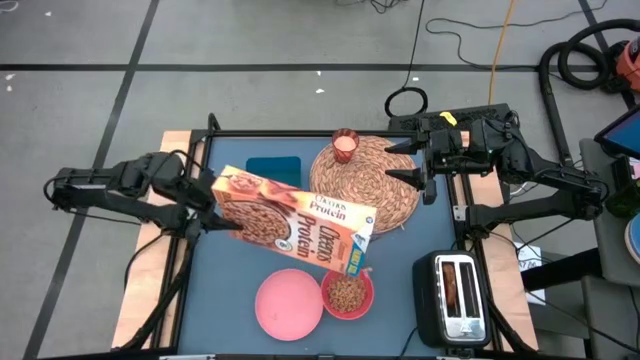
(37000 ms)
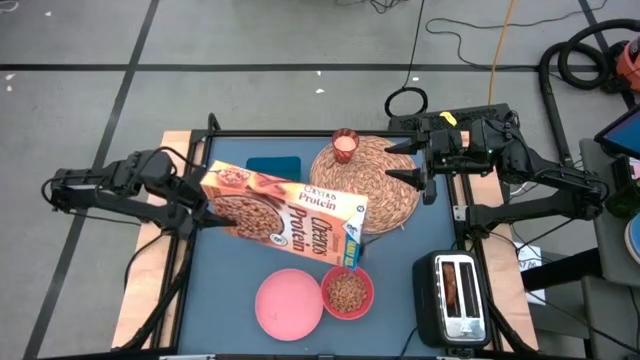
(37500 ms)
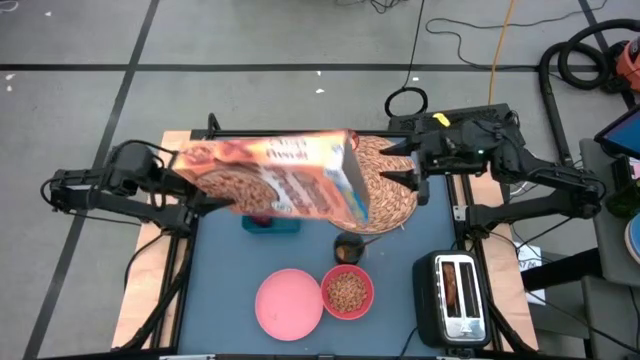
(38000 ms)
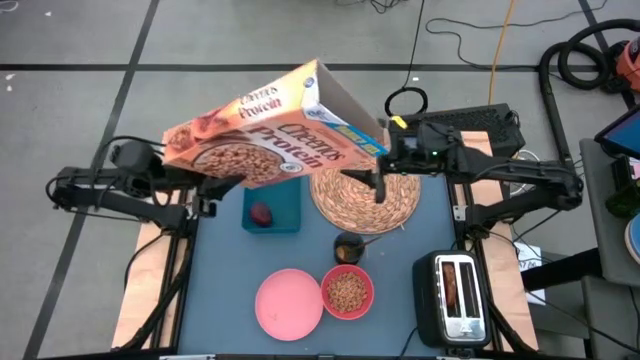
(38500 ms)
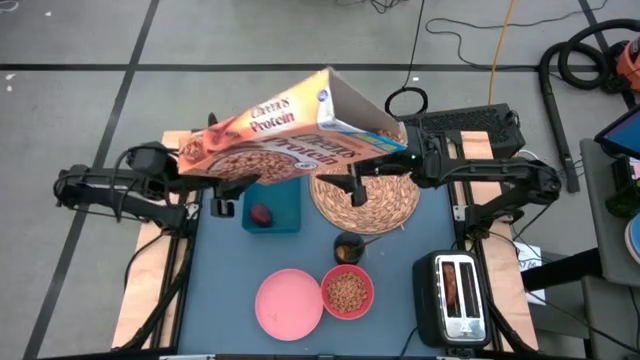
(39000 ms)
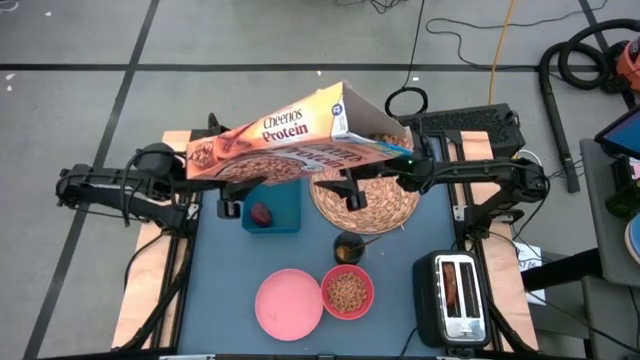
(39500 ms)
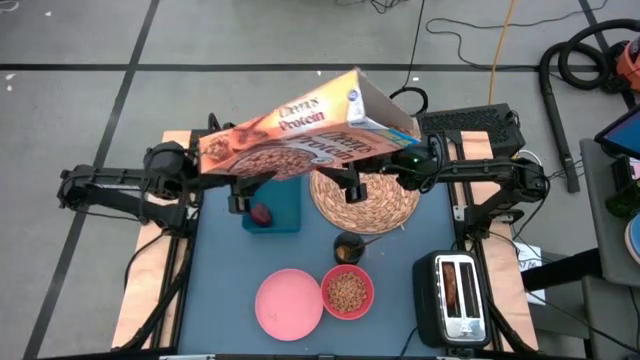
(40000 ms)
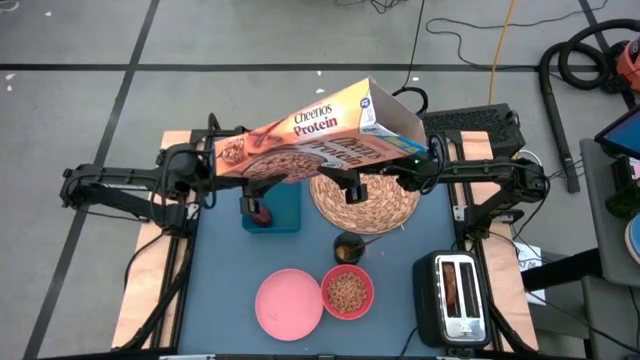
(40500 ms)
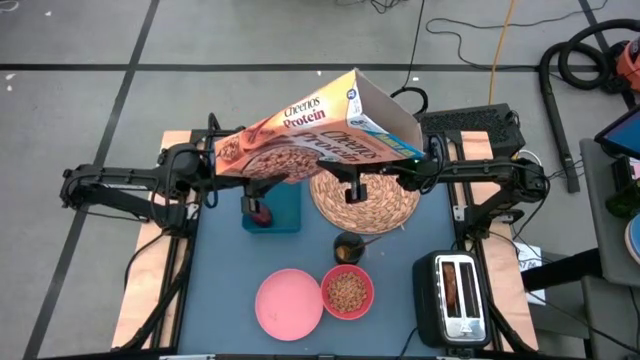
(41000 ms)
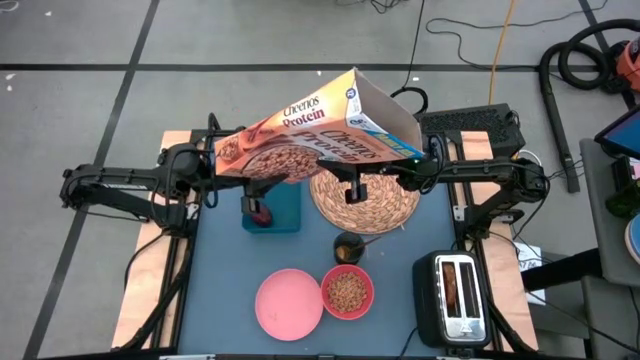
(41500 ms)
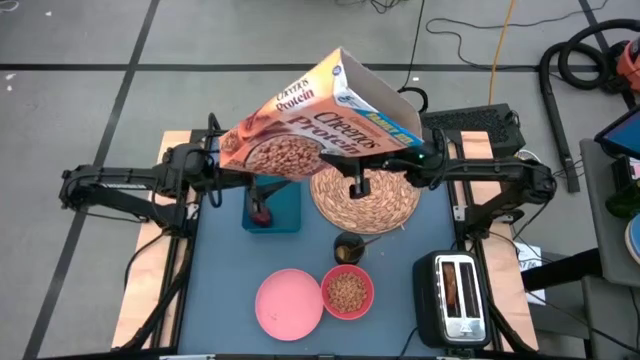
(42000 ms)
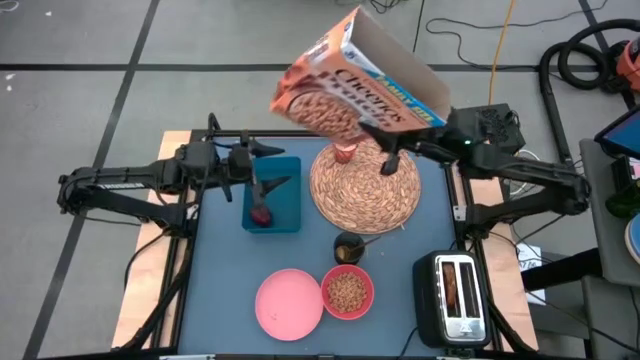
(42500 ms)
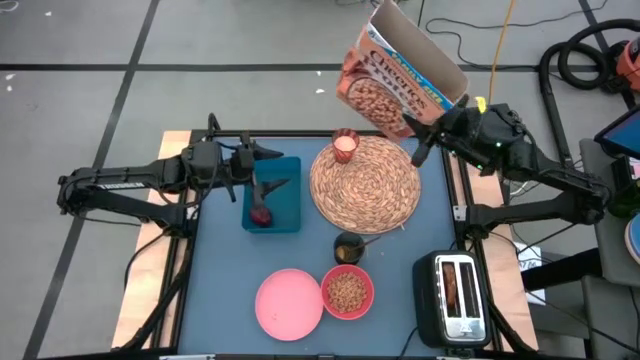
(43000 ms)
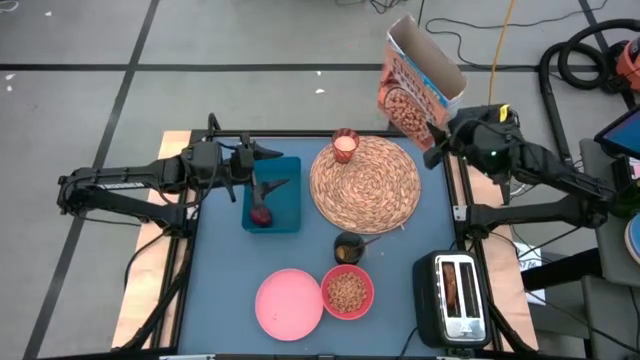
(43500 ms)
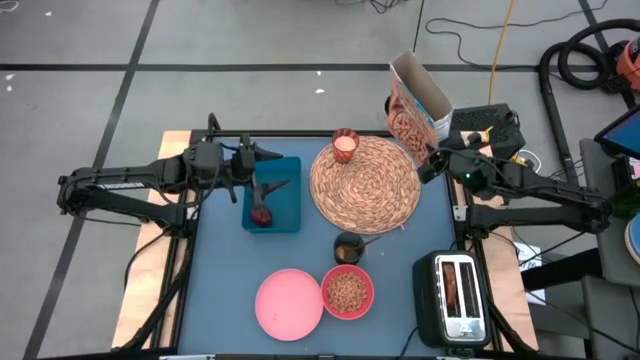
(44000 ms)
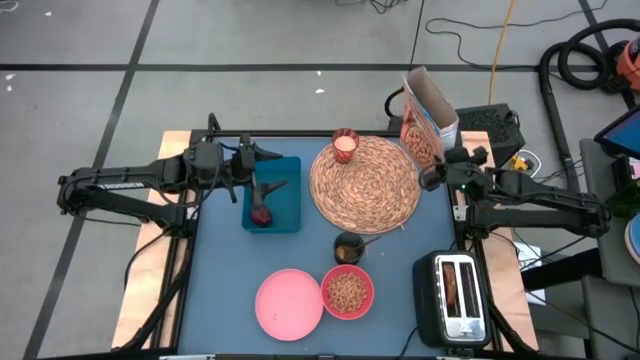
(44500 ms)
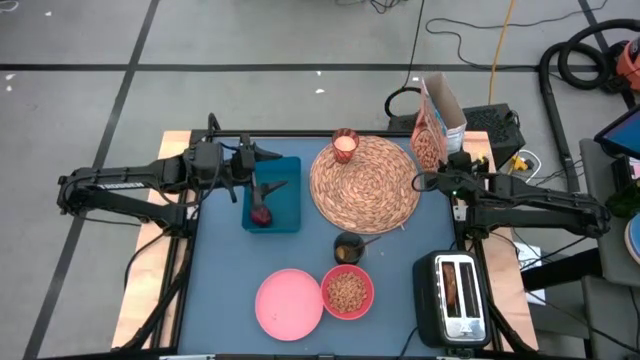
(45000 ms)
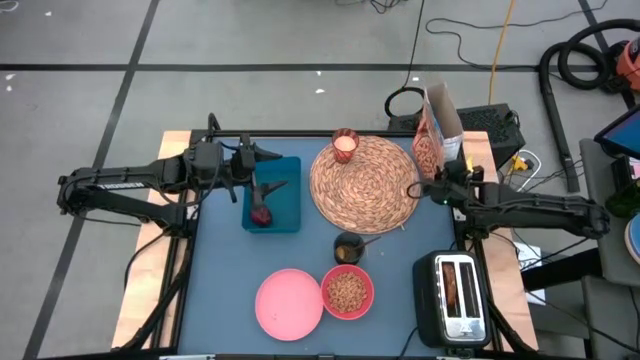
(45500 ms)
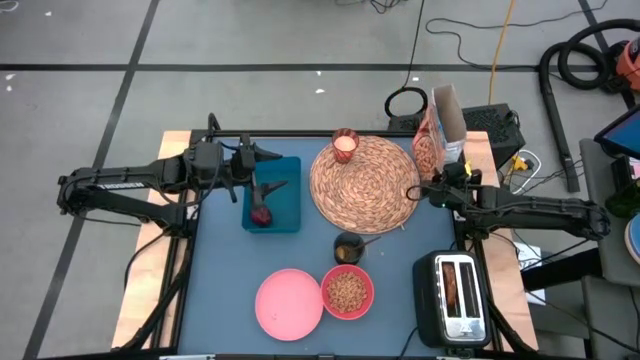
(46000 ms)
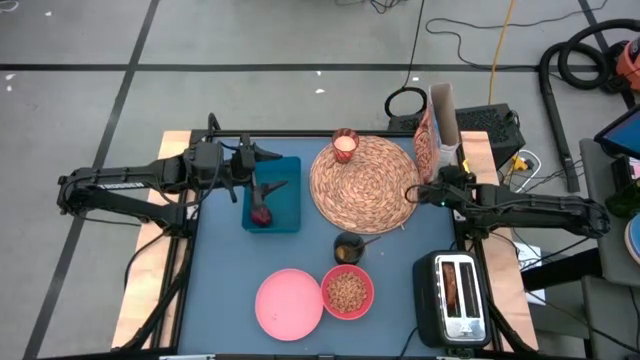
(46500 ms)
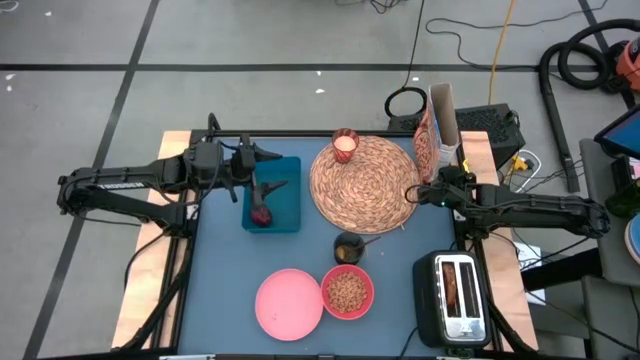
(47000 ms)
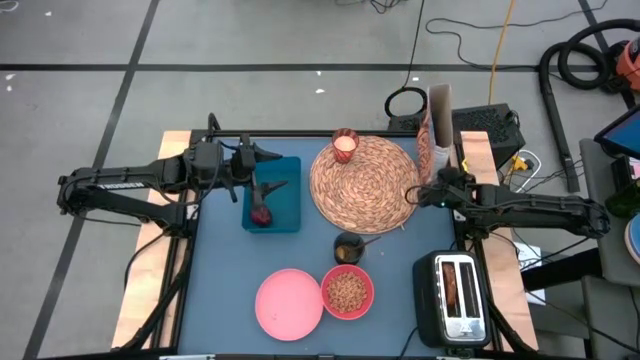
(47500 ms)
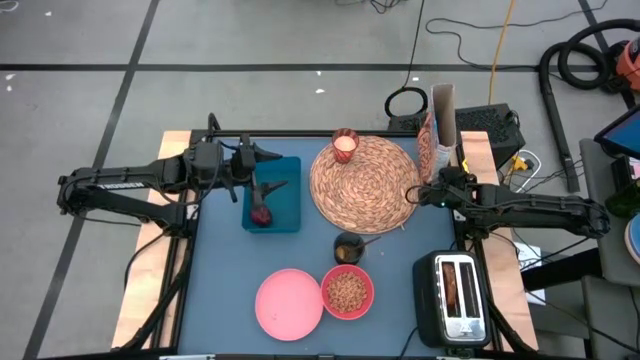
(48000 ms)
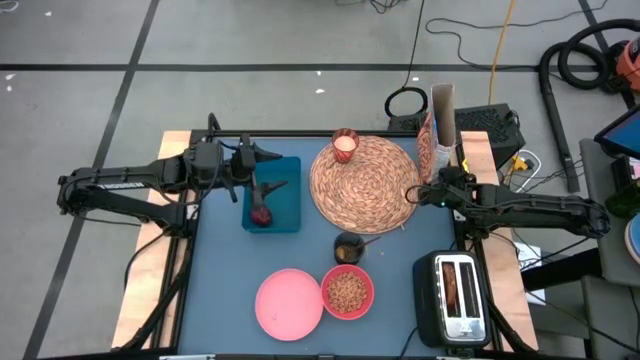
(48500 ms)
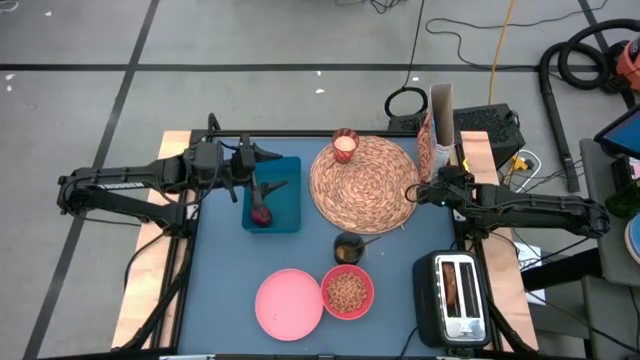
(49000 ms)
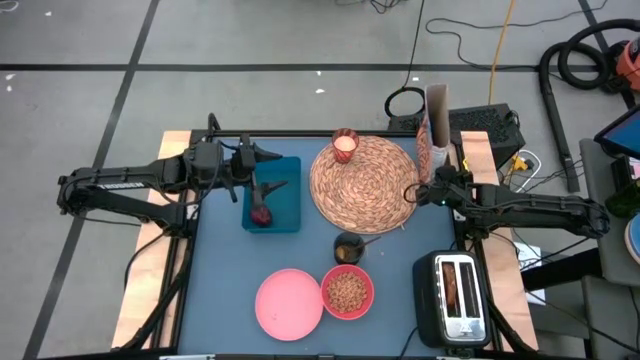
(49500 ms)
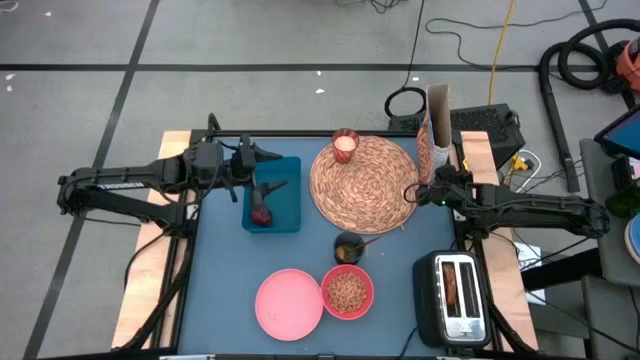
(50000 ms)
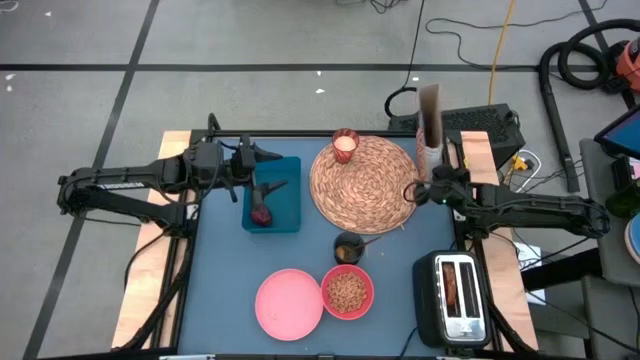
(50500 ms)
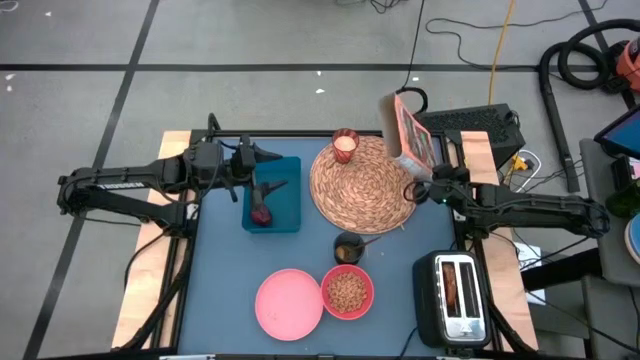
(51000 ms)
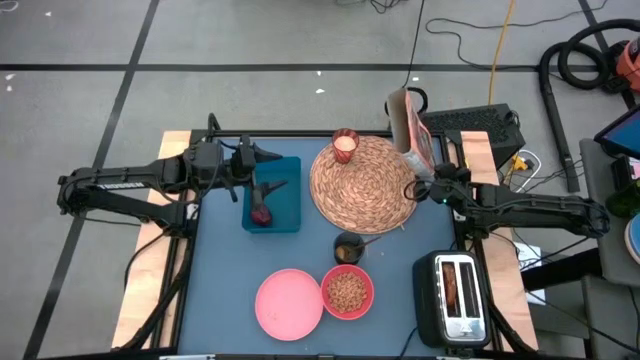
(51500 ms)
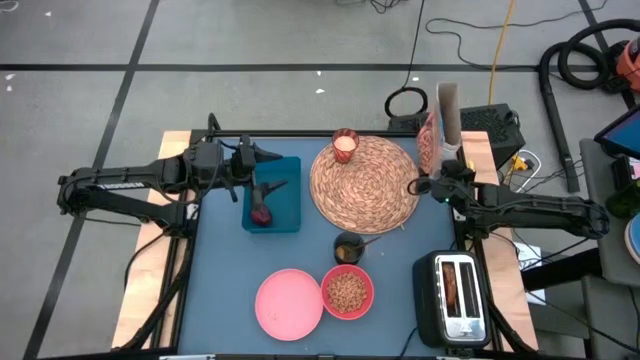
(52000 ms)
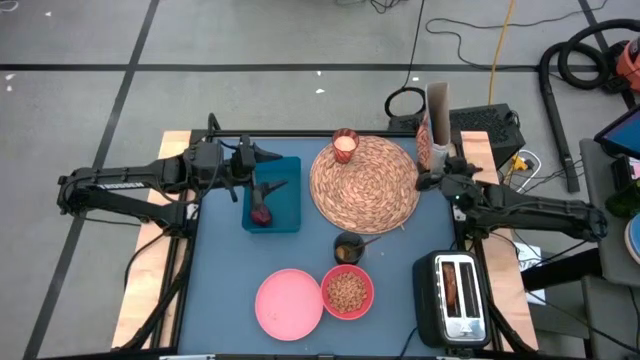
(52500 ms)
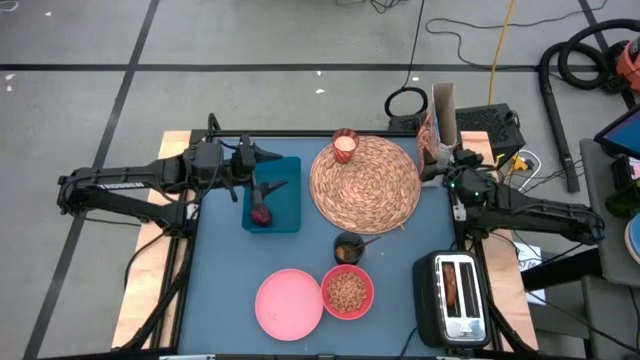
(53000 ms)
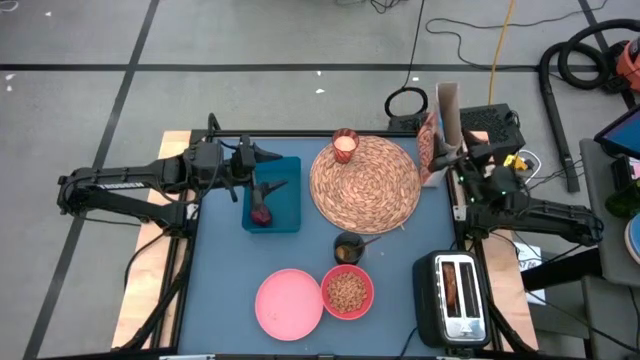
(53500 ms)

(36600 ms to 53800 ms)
Task: Arrange a breakfast setting
Pour the cereal into the pink bowl

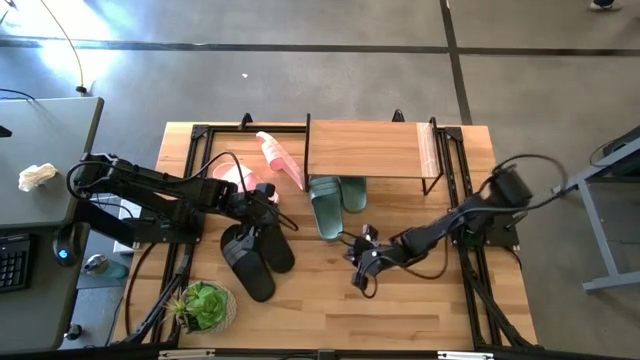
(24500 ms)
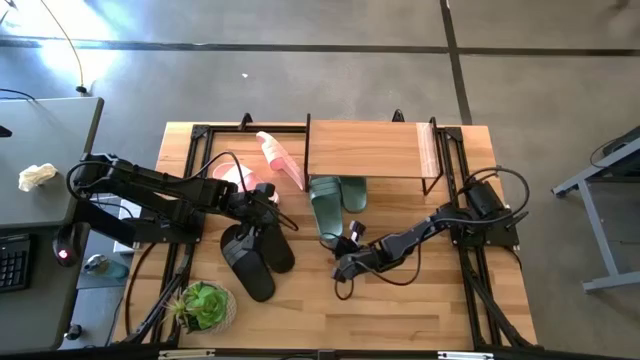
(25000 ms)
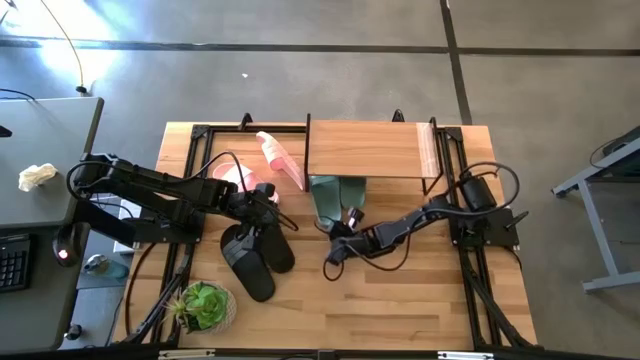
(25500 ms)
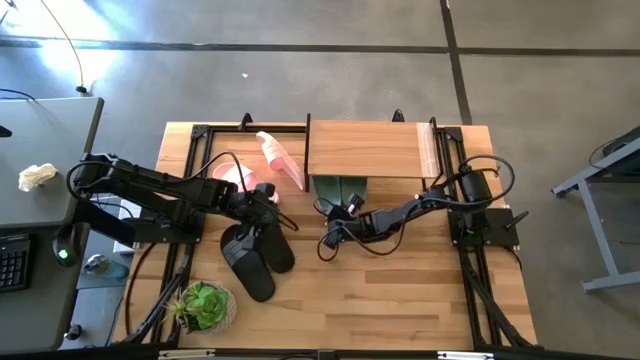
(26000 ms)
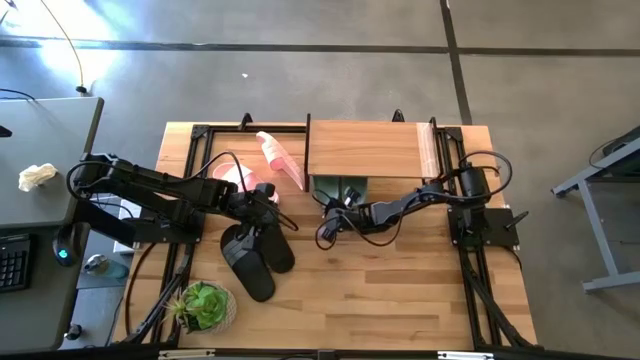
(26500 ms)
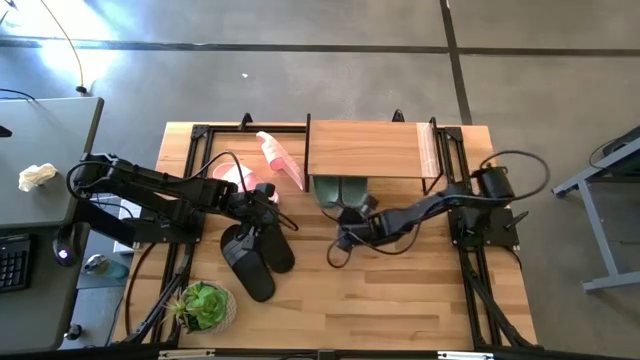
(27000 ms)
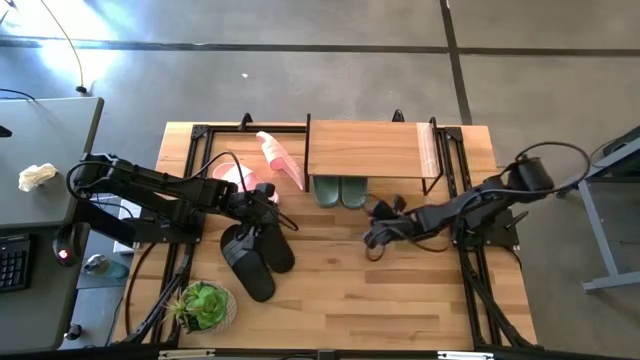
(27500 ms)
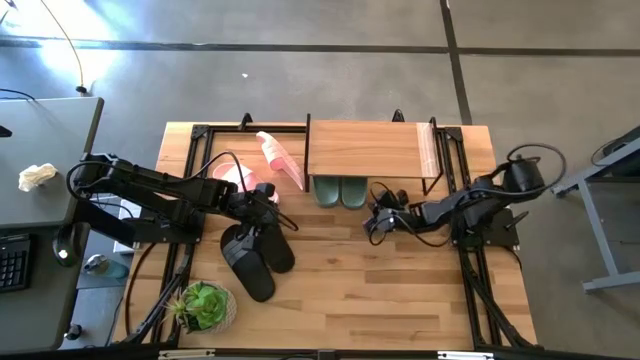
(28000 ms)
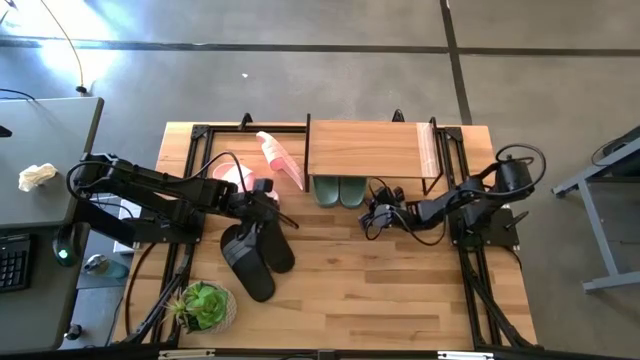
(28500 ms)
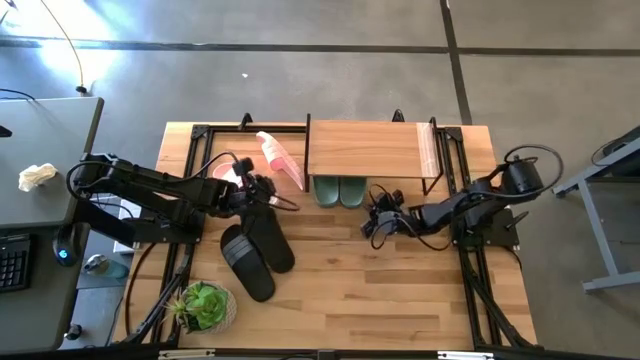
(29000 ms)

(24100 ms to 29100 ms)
Task: Pick and place slides into the shelf
Adjust the pair of green slides
